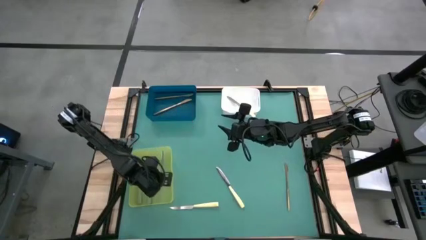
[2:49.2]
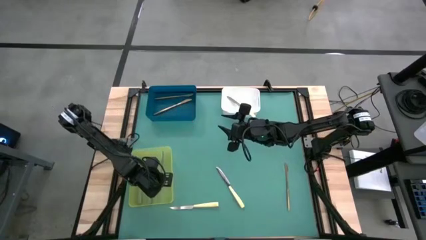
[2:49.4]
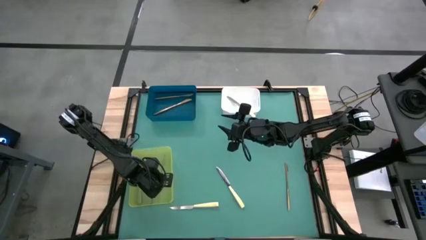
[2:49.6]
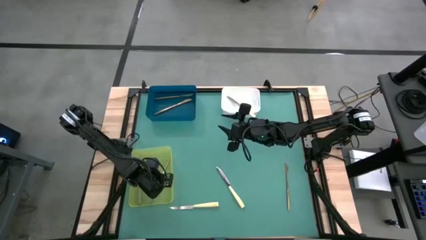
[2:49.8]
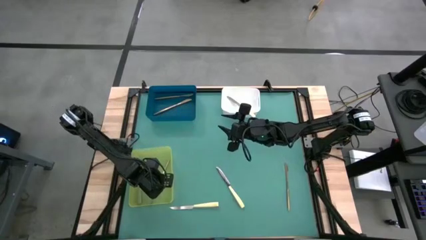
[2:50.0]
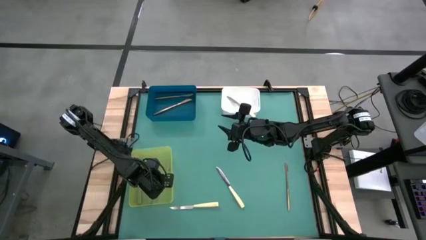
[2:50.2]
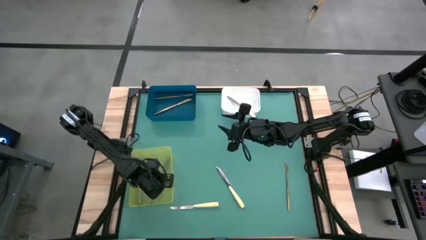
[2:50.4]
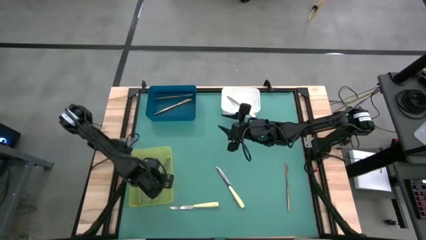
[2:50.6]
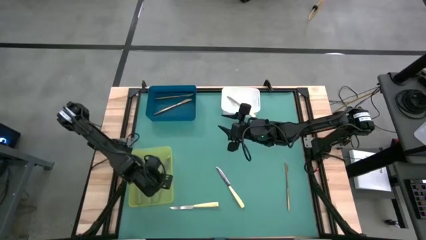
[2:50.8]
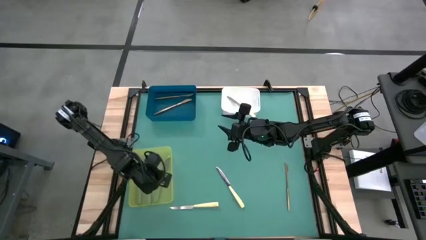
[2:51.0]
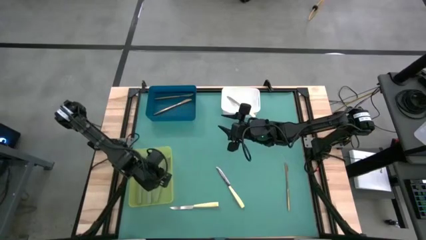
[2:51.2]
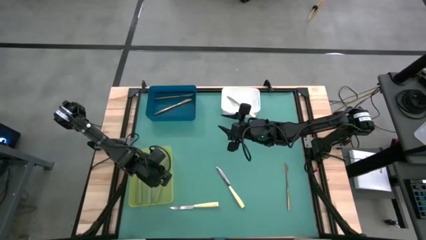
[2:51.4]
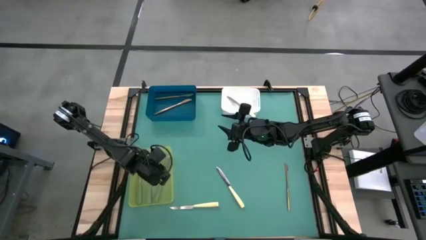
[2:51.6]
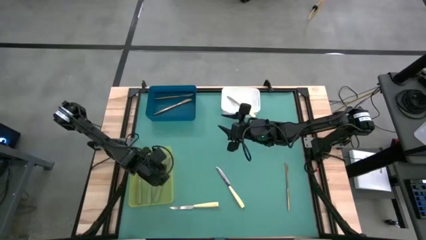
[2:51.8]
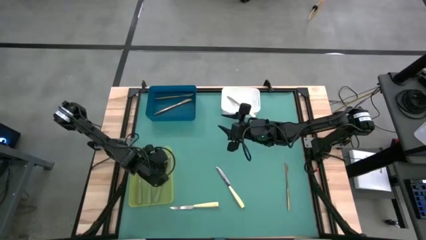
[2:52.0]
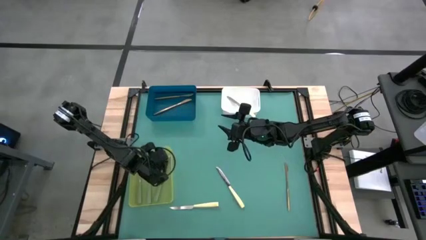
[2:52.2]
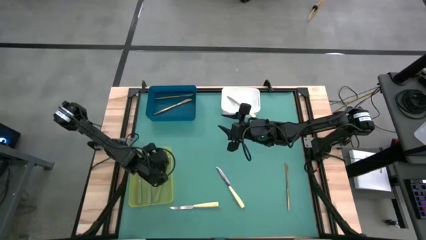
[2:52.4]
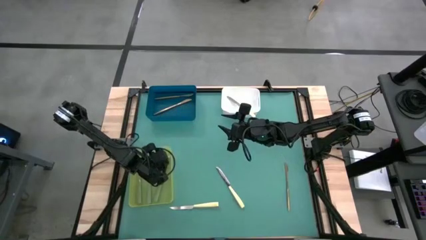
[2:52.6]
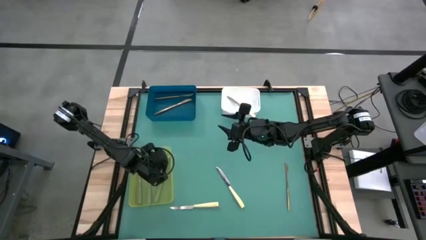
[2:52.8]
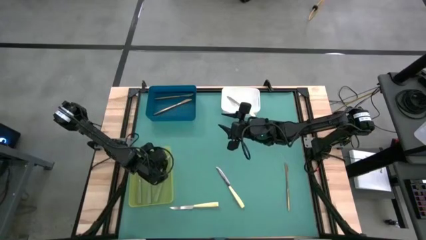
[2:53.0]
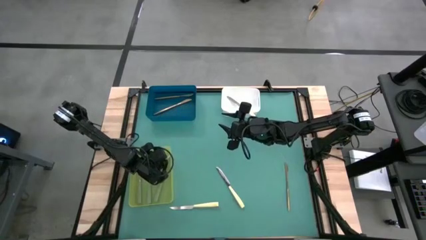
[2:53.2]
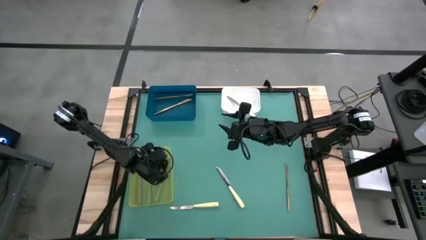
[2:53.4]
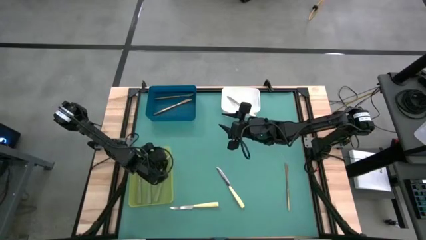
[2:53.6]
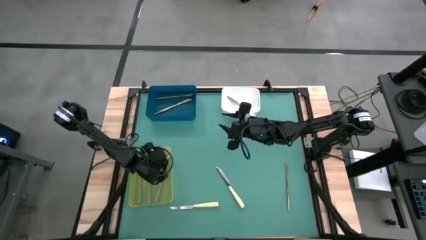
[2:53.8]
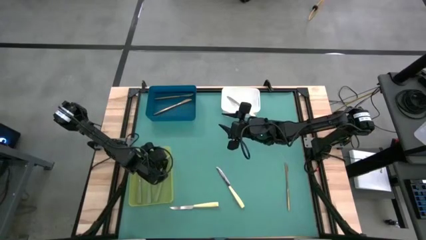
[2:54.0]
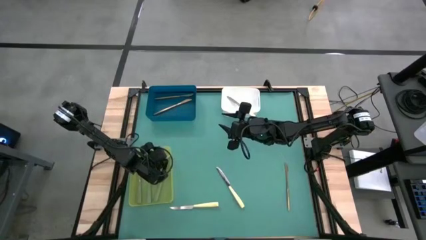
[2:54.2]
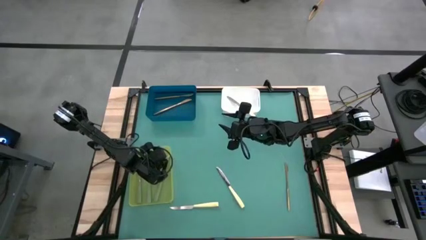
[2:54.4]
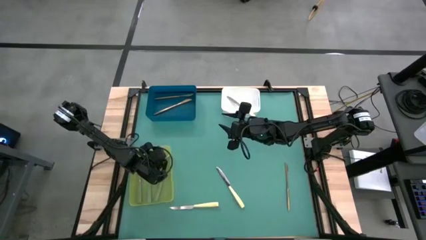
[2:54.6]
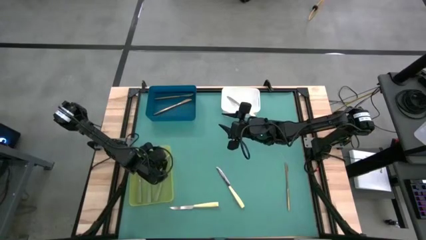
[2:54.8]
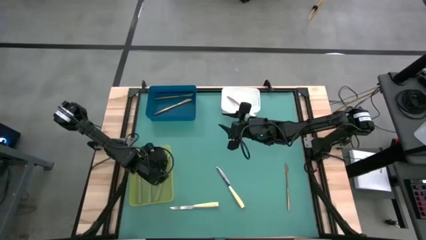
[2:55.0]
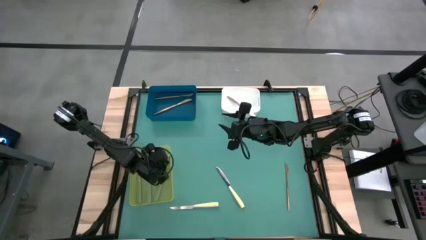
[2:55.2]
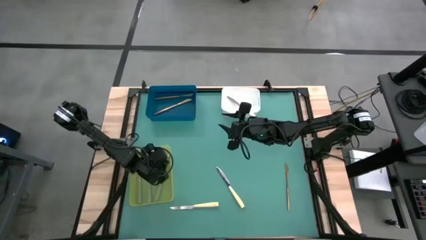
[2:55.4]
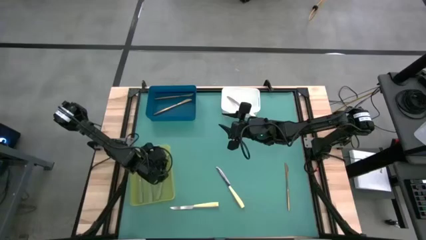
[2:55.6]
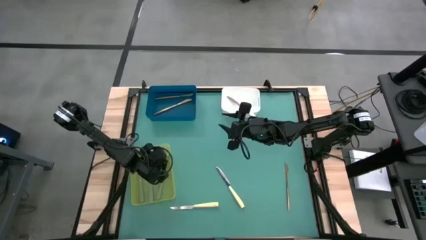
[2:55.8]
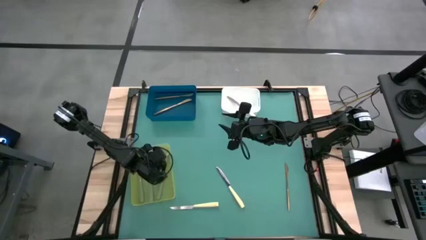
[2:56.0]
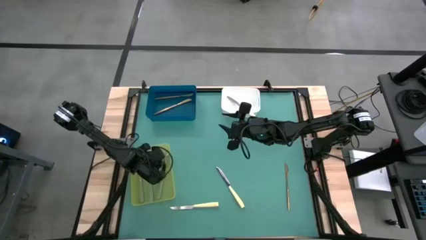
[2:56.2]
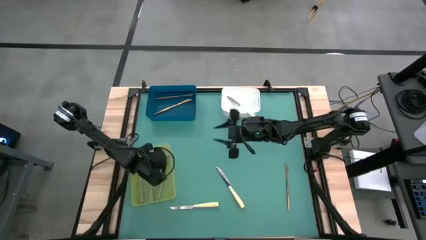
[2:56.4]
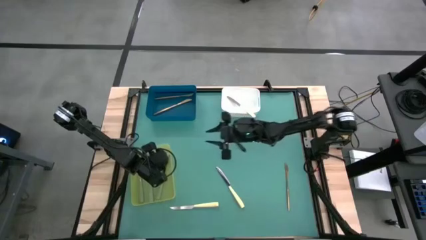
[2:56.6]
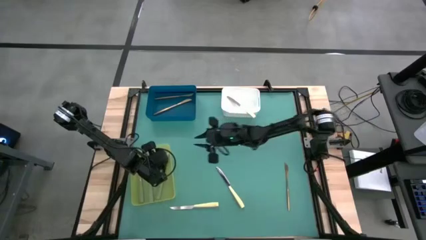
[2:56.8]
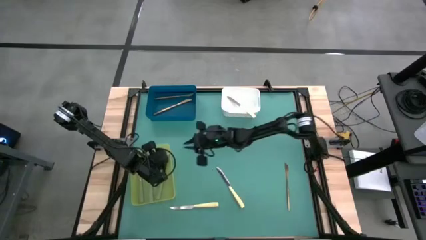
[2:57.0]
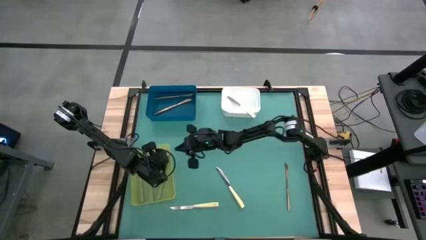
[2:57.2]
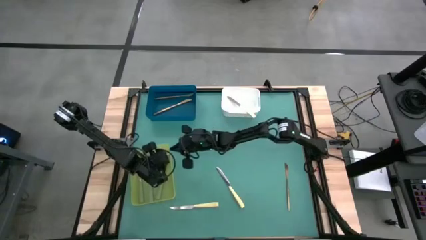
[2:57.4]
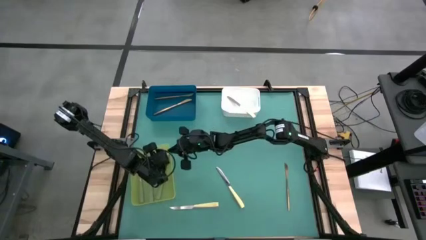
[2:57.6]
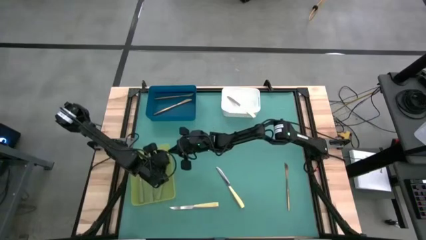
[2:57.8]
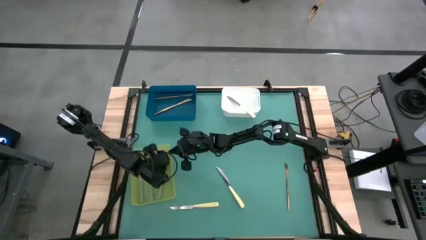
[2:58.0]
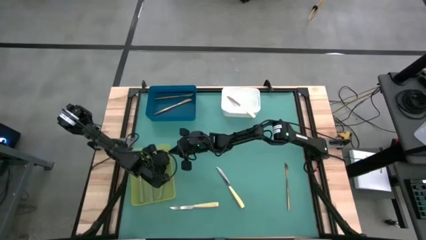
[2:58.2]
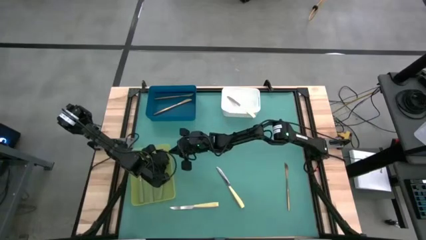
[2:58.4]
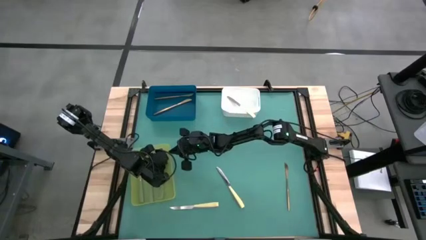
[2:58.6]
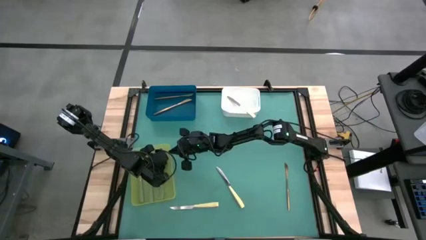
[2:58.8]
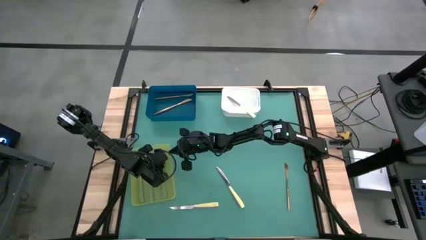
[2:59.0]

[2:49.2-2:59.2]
Task: Sort silverware by color (type)
Put the green knife into the green bin

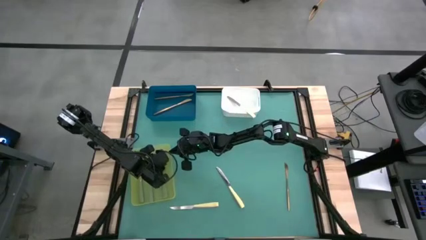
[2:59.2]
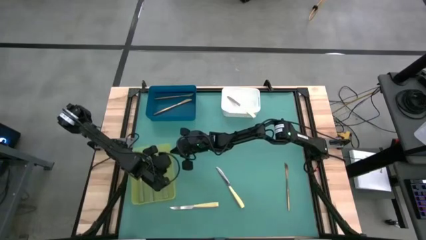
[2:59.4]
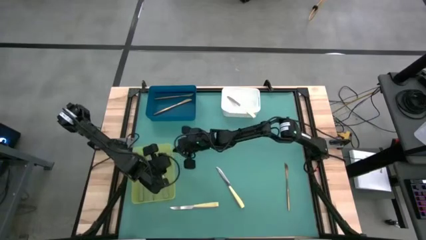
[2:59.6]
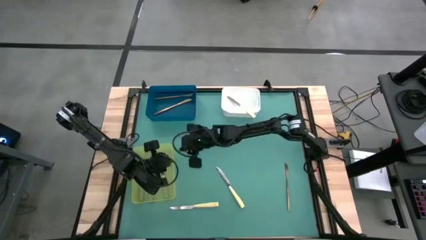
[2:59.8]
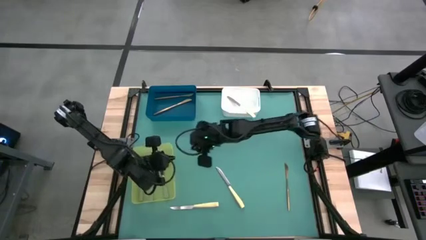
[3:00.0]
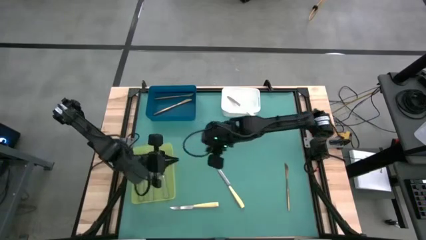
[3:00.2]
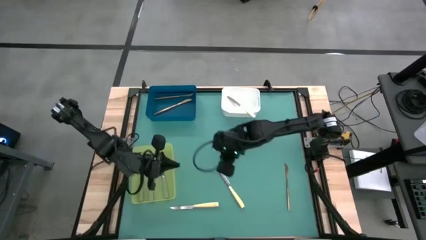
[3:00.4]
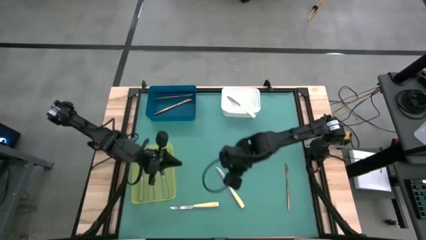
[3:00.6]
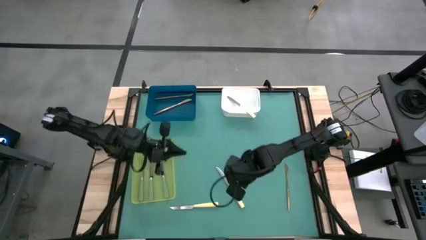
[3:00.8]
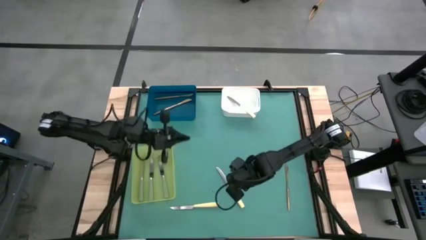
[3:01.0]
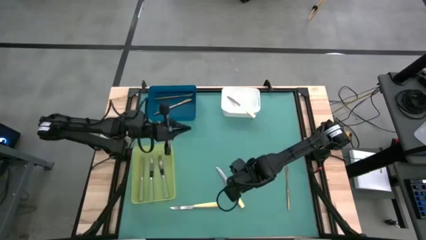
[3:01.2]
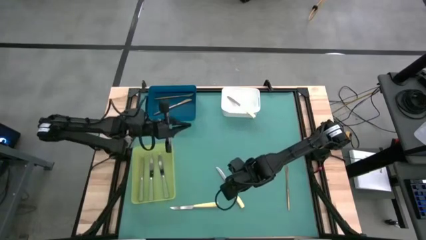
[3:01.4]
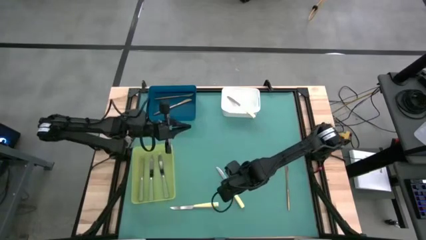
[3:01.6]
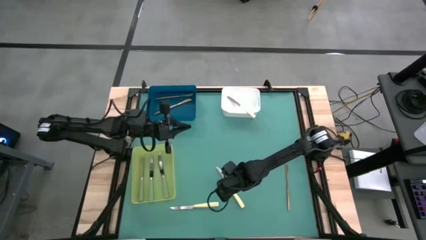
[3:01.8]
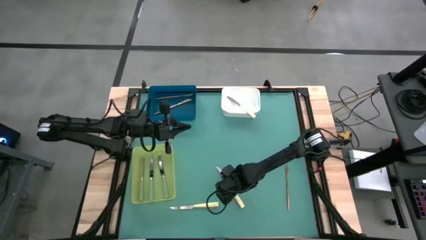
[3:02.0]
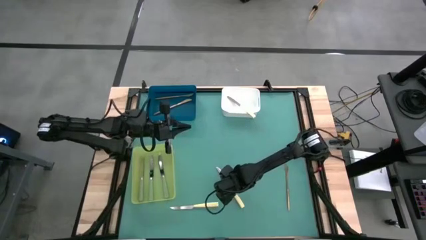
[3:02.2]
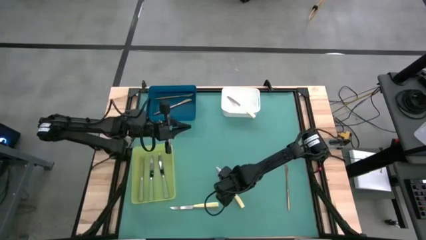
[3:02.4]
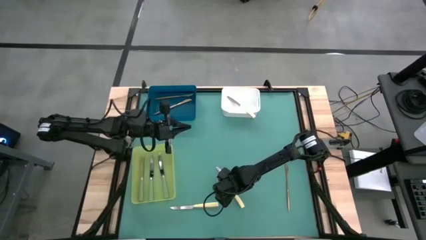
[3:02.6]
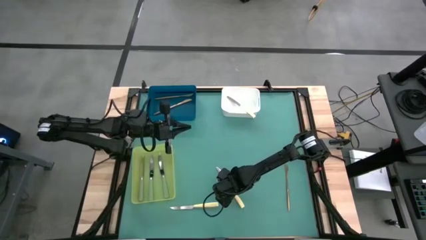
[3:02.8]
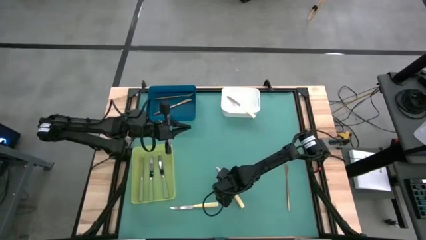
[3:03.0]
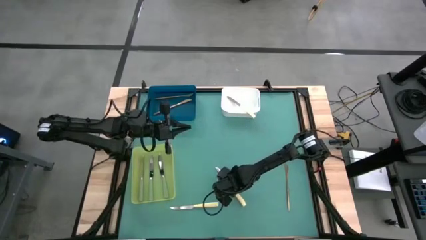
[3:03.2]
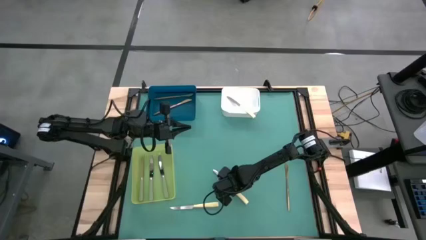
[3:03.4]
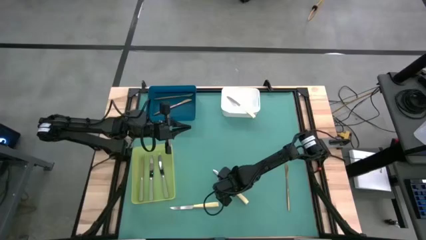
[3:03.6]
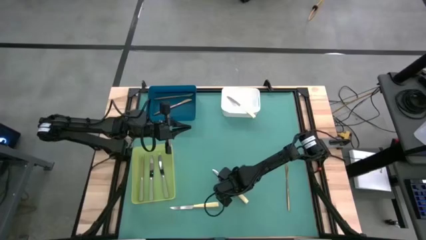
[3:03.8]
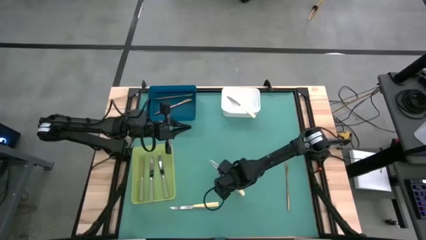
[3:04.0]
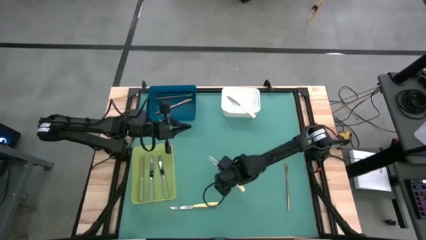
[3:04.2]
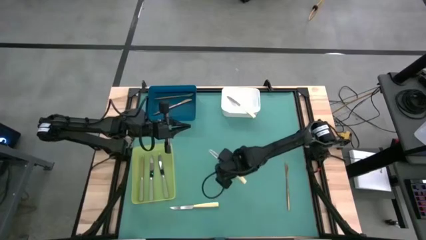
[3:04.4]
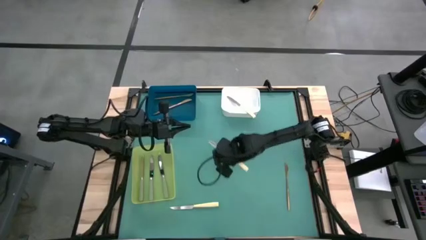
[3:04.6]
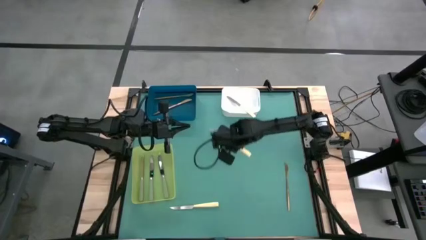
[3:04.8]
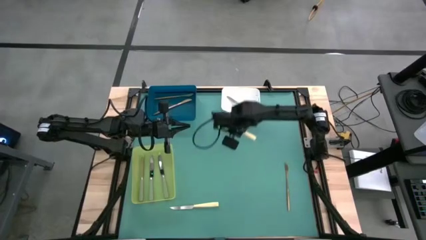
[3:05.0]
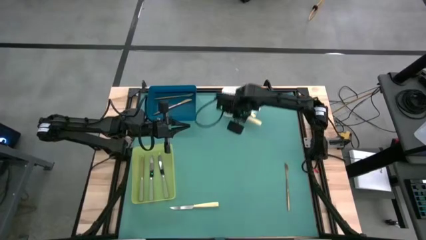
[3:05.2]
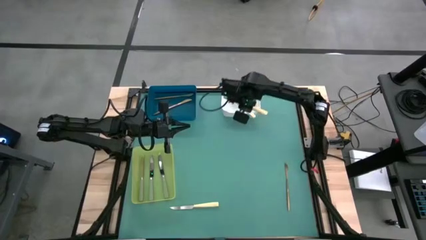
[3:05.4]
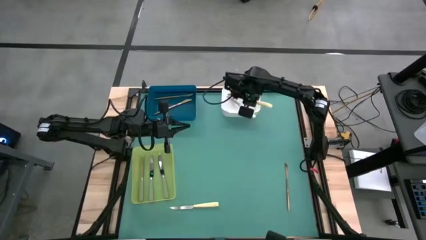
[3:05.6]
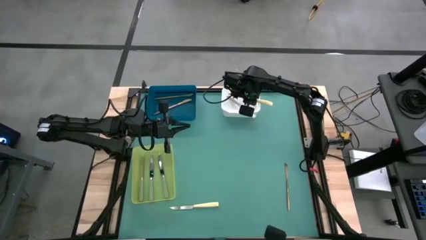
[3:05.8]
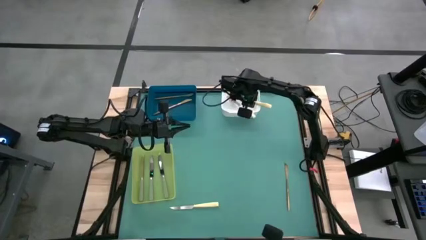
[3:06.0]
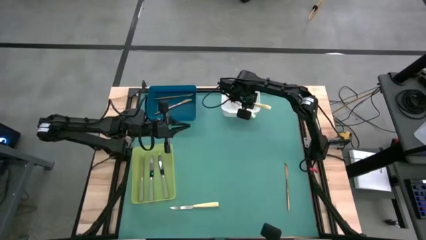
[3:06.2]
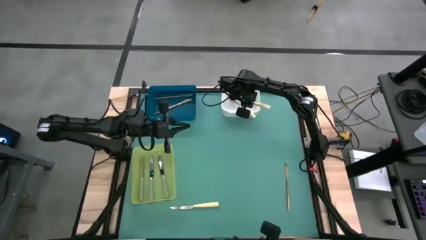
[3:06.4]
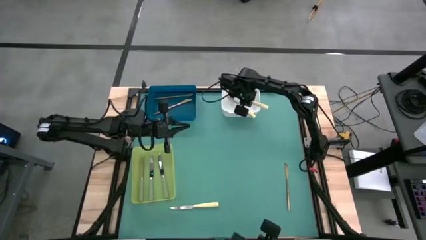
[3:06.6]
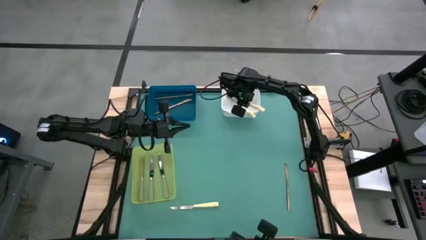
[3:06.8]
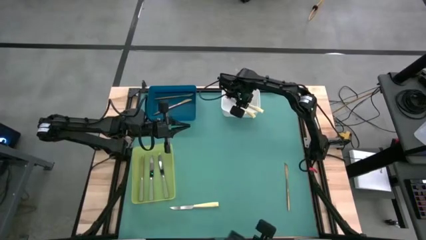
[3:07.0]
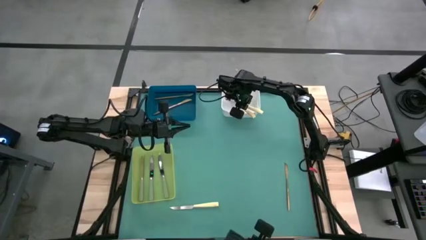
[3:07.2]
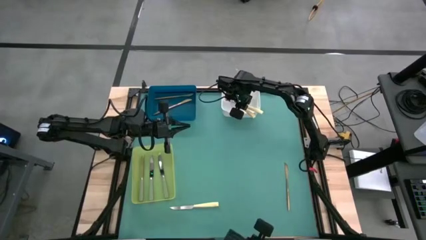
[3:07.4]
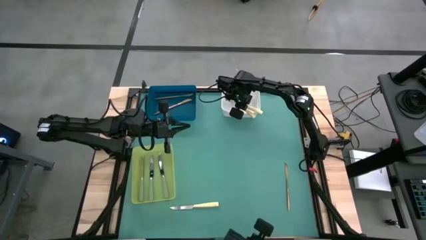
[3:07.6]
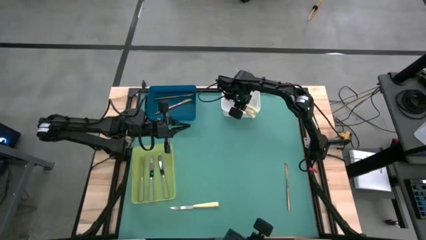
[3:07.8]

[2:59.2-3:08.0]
Put the right yellow knife into the white bin
